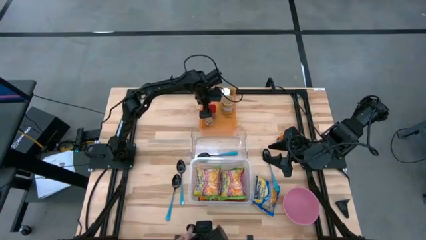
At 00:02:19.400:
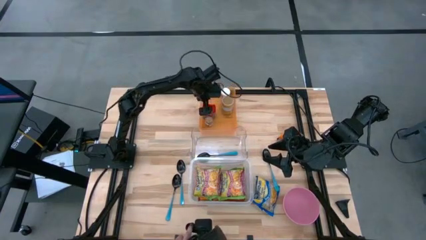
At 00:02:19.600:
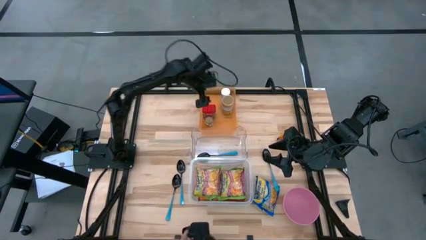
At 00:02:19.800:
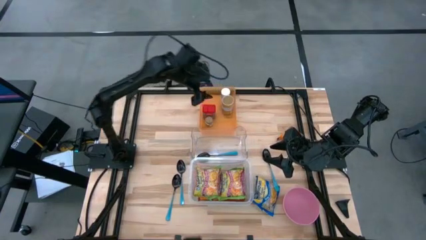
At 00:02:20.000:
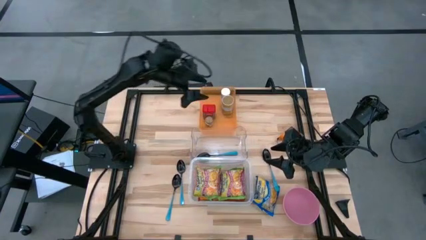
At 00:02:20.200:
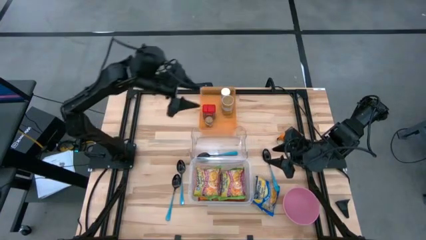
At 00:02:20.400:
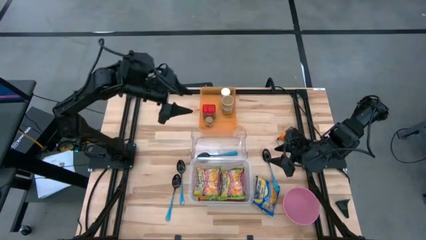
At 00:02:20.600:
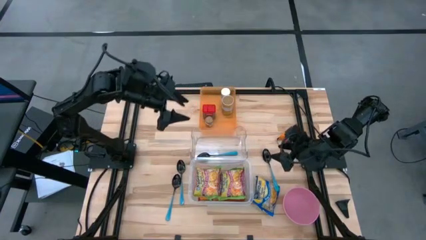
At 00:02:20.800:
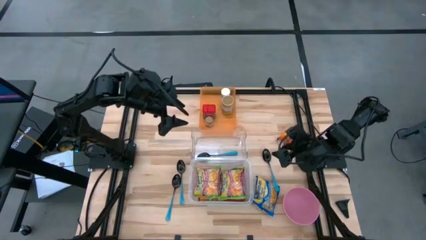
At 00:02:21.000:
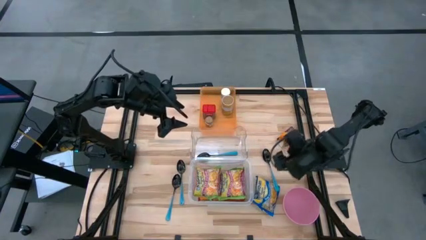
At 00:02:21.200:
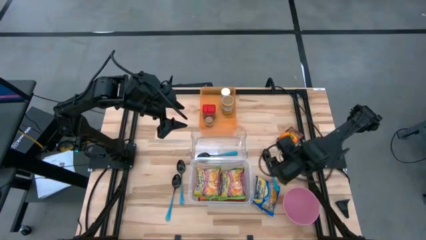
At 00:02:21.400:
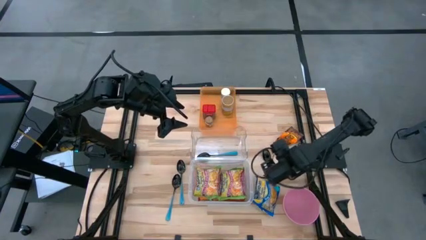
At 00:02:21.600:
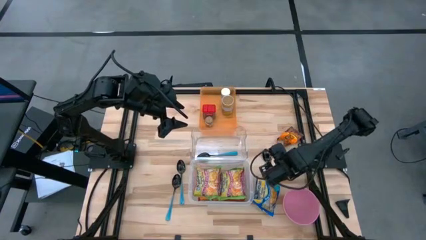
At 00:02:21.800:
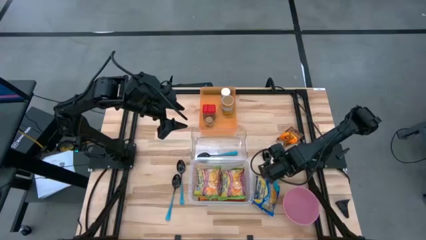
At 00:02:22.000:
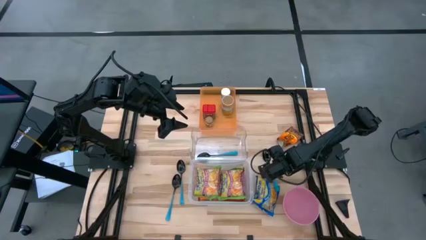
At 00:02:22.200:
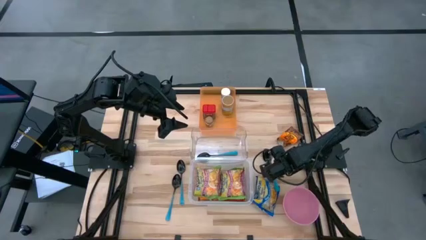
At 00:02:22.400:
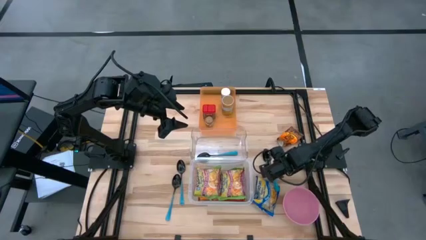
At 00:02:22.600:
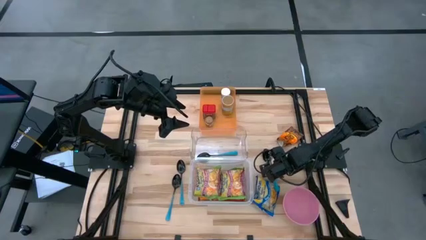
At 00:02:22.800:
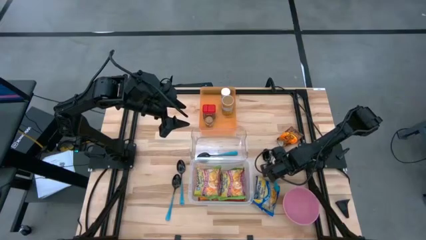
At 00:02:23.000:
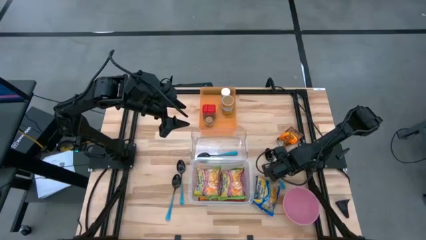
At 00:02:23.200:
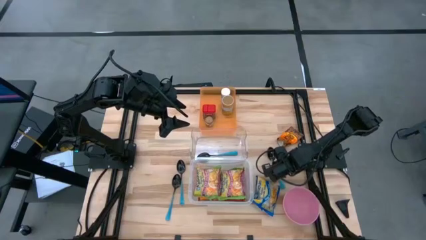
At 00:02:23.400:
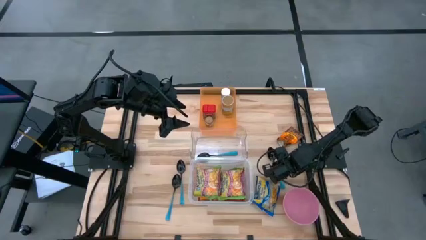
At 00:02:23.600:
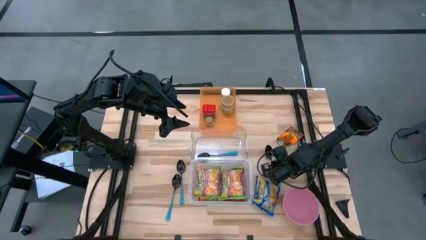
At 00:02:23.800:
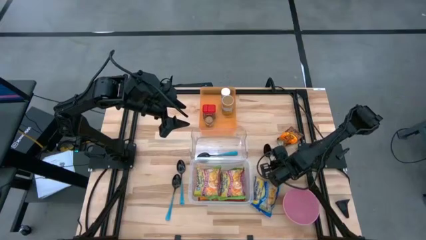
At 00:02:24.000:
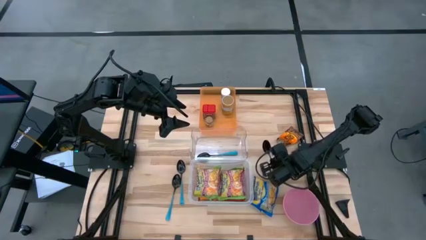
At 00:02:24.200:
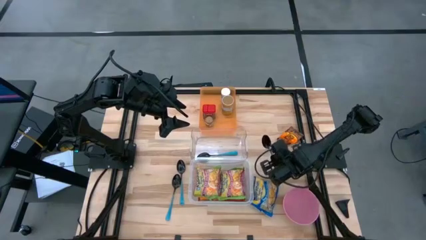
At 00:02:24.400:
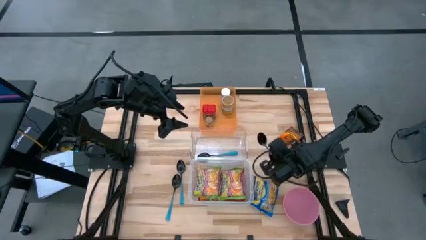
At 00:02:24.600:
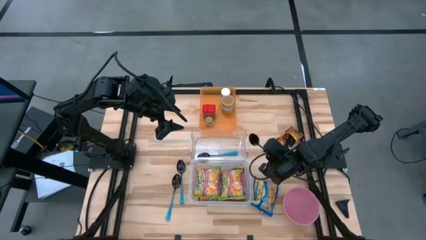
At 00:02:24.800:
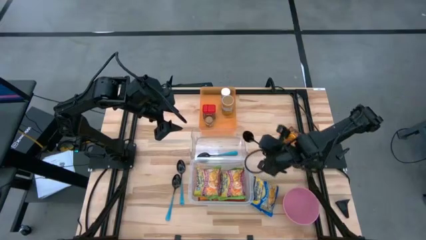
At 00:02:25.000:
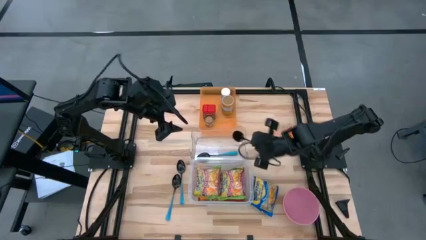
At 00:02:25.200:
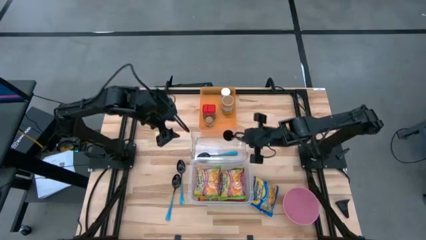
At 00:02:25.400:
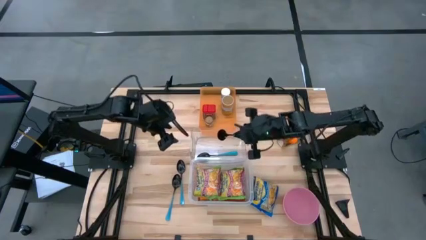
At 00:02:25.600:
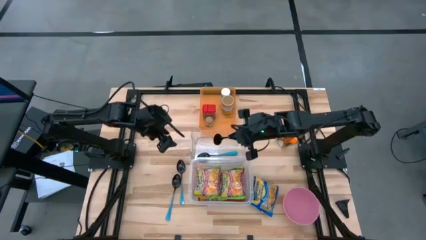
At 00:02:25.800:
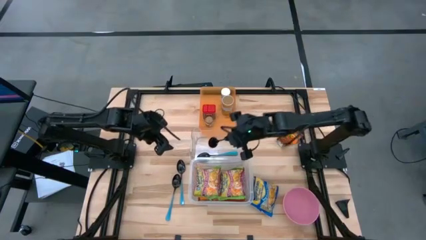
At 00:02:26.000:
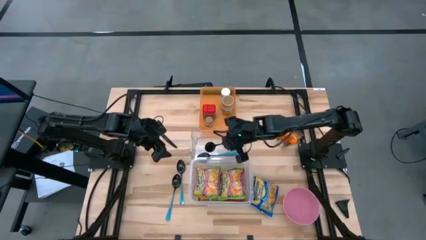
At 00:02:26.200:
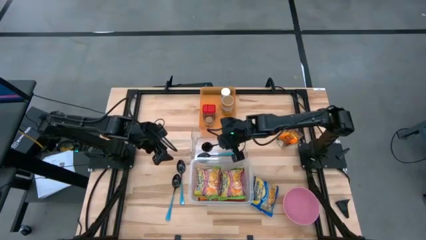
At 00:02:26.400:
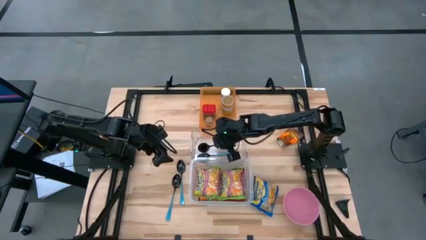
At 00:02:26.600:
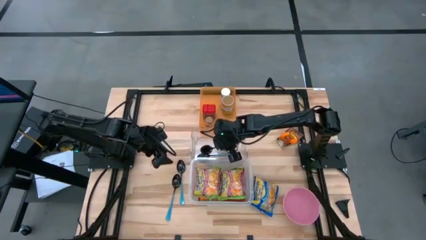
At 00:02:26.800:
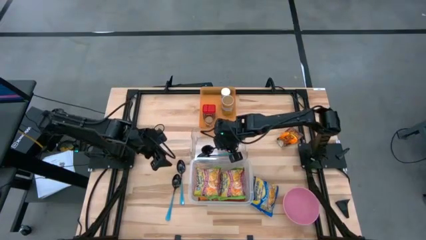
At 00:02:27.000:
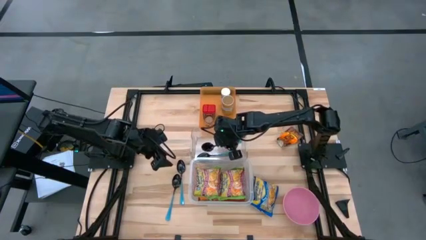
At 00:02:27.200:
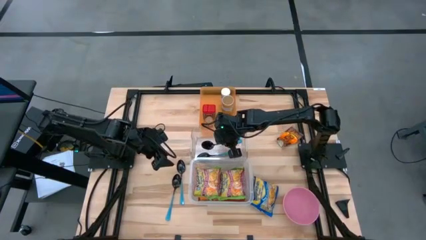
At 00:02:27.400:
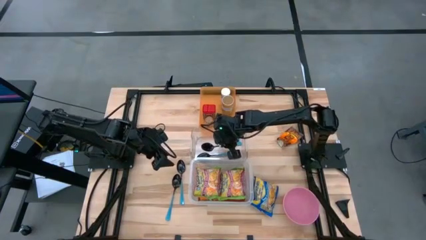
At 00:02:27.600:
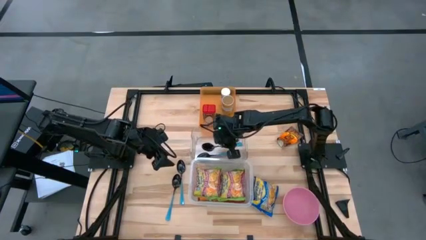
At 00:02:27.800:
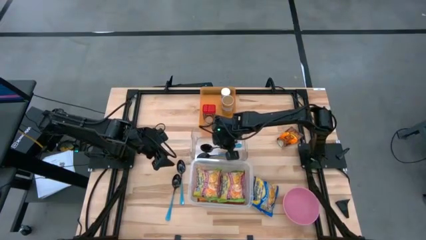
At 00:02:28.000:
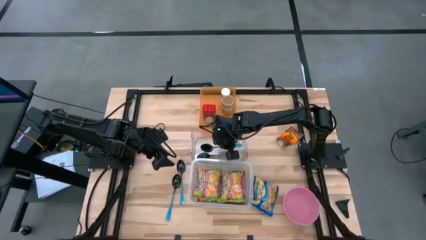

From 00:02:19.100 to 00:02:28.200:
Task: Pick & Place Food Item
Put the blue spoon into the transparent bin

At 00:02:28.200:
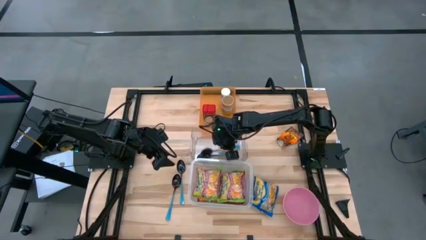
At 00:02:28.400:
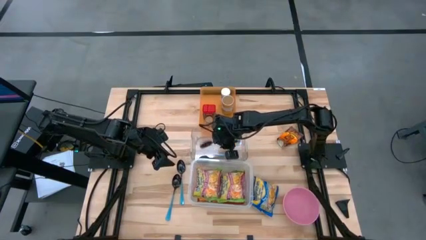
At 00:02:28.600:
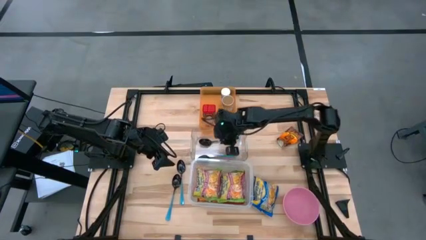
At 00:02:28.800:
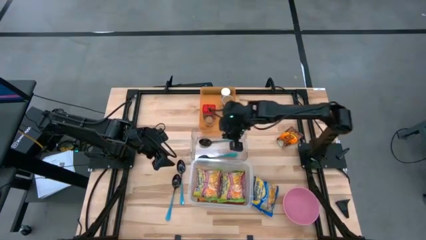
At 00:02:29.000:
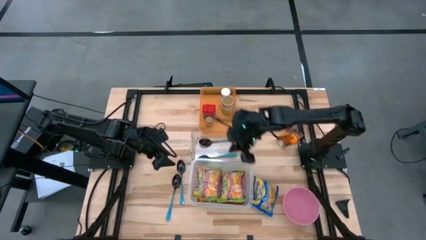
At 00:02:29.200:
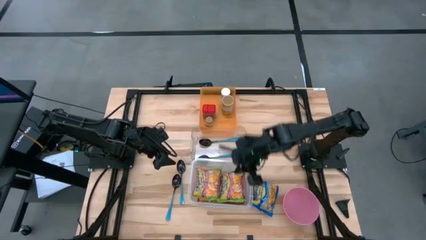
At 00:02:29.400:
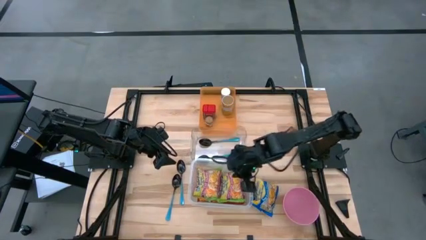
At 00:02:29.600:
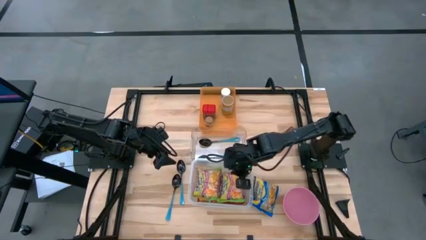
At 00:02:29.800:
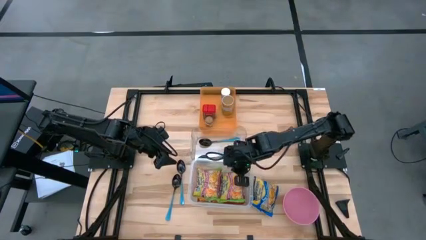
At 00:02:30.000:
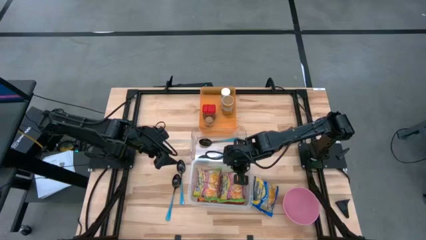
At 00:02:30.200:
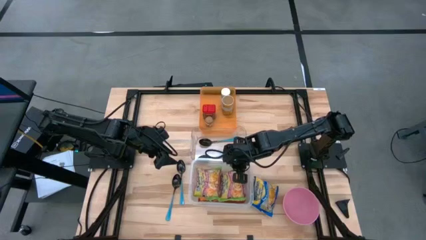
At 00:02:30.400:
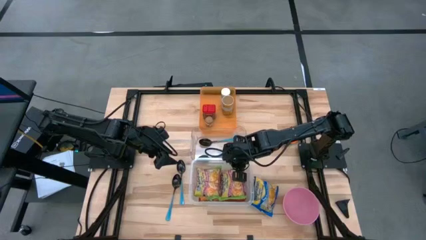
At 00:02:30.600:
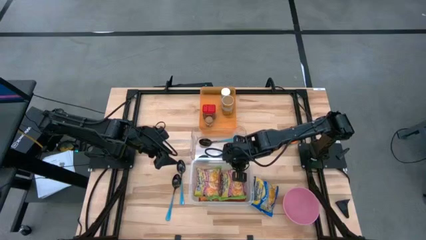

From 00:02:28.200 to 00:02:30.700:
Adjust the white transparent bin on the table

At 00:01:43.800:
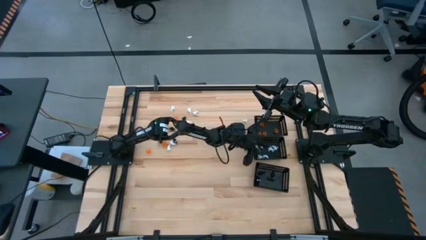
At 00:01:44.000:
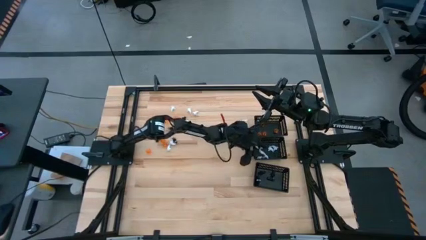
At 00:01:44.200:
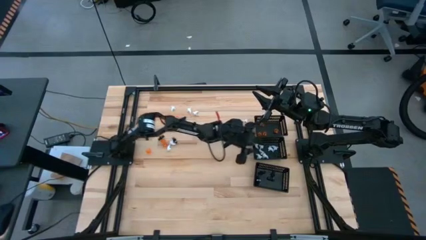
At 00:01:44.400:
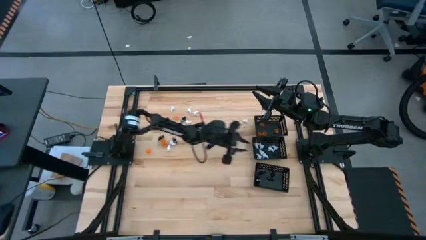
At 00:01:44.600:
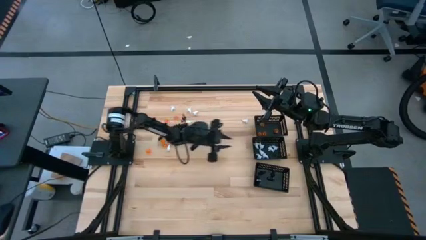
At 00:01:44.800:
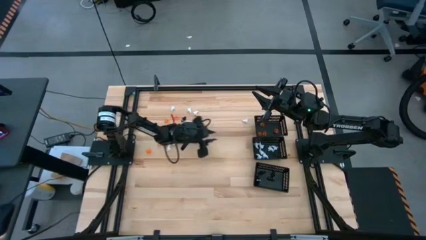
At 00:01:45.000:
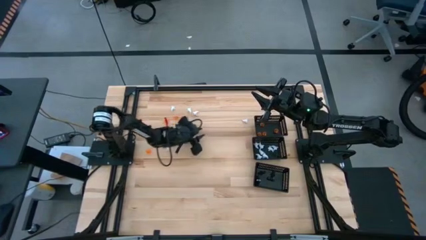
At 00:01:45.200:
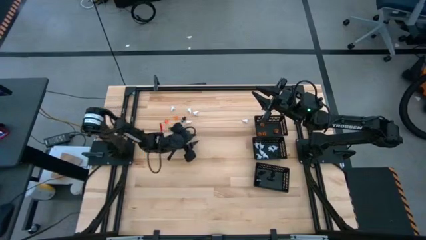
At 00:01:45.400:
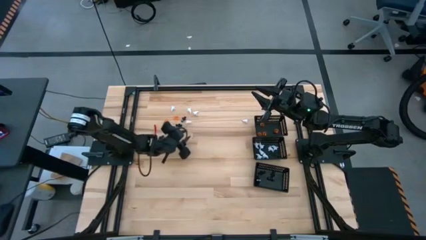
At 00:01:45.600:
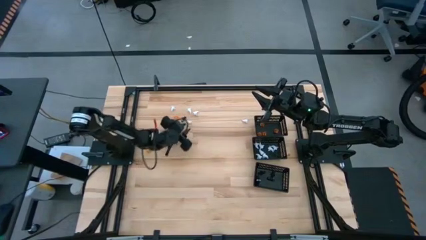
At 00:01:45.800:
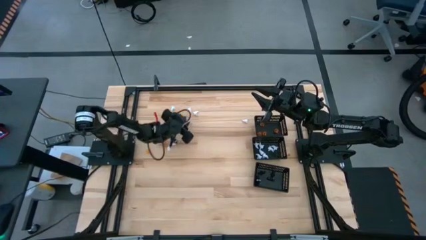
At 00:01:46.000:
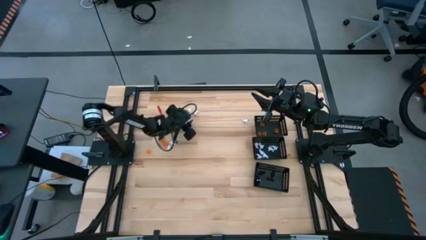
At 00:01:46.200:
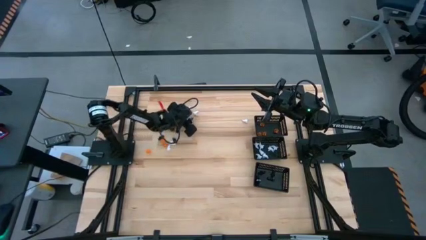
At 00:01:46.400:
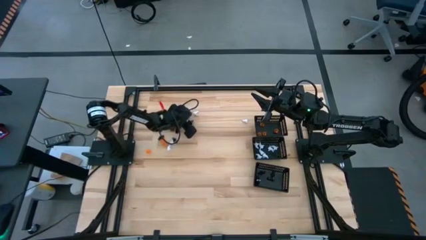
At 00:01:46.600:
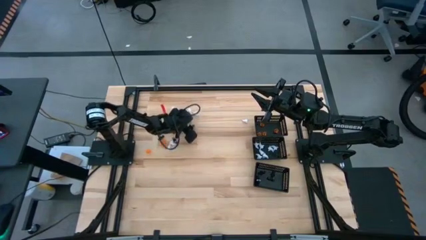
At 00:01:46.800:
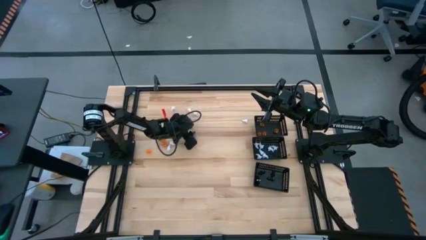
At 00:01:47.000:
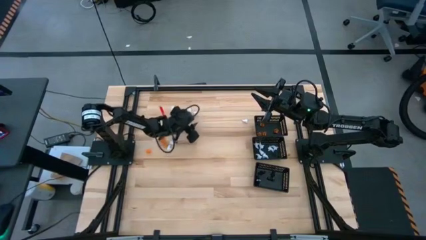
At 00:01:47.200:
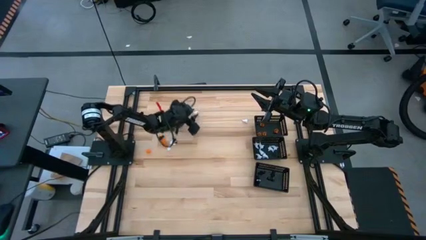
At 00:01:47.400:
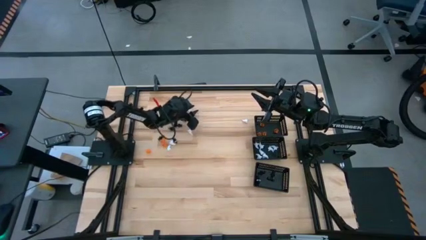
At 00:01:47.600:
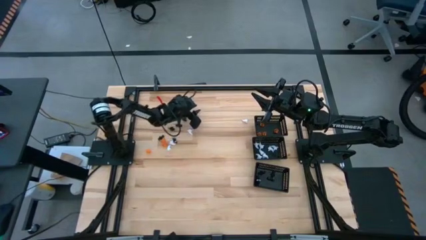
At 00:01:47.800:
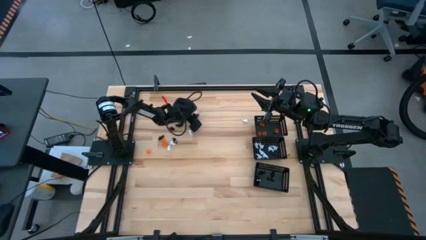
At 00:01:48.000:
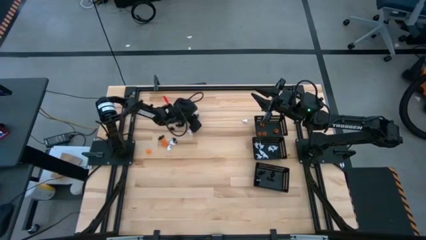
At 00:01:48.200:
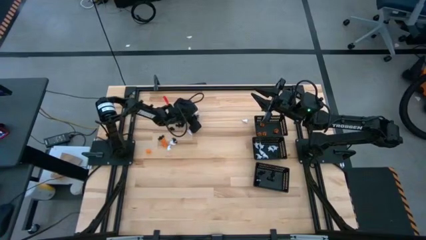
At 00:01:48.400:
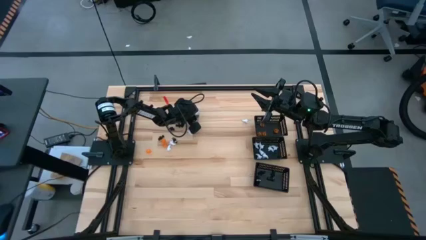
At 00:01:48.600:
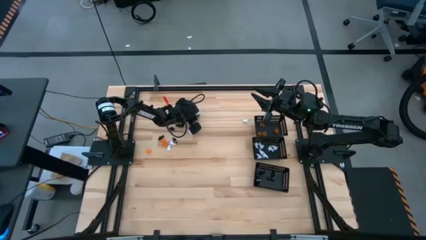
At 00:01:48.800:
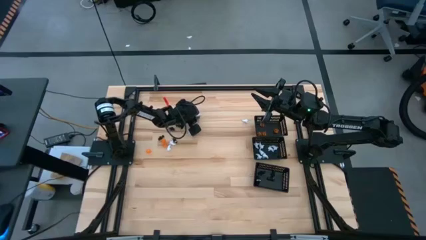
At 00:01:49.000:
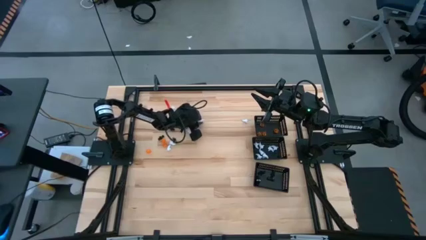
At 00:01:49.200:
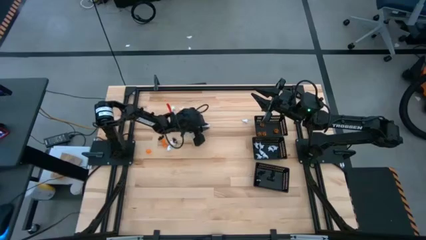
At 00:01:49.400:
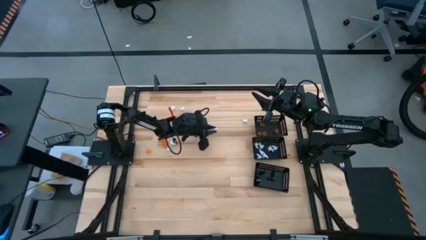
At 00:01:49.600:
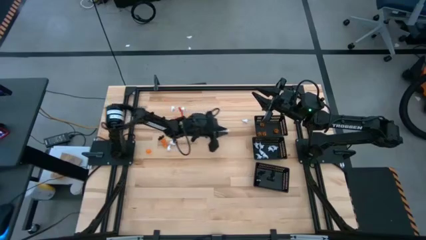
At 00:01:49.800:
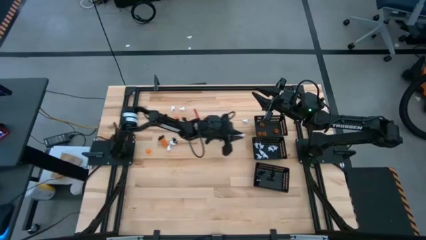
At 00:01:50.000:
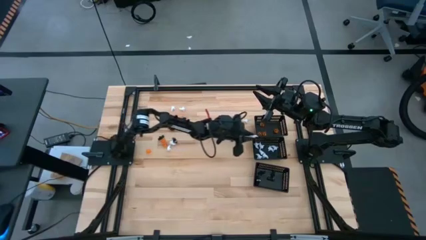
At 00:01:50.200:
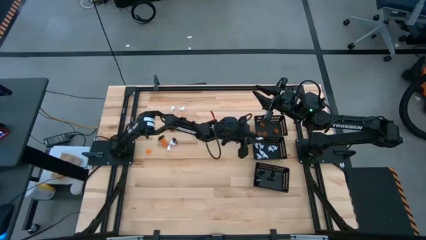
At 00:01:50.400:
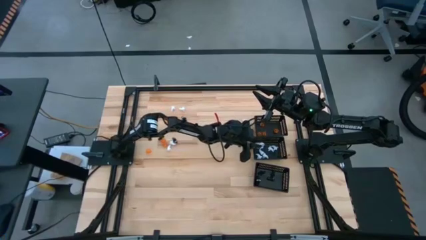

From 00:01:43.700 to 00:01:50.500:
Task: Sort Halloween decoration
Put the white ghost toy into the center black bin
